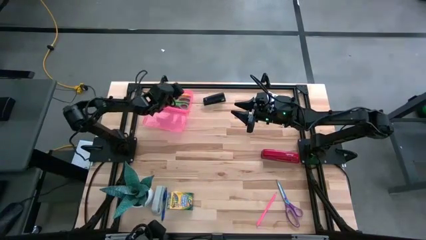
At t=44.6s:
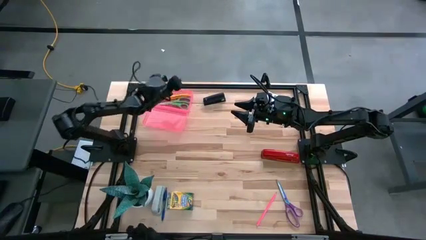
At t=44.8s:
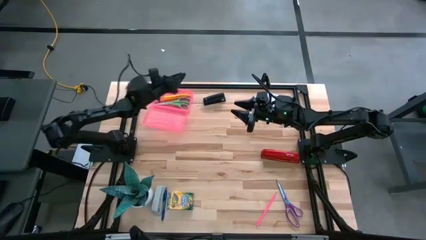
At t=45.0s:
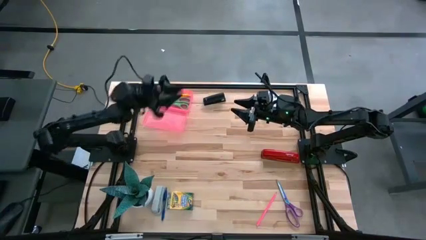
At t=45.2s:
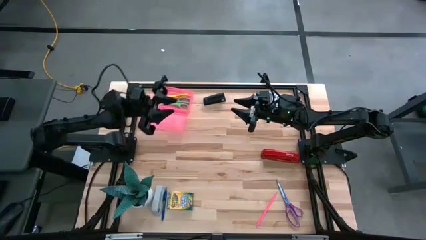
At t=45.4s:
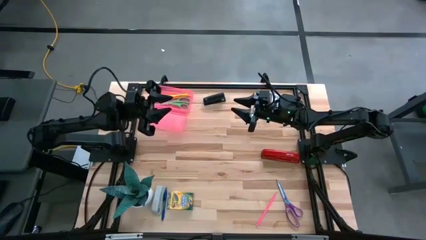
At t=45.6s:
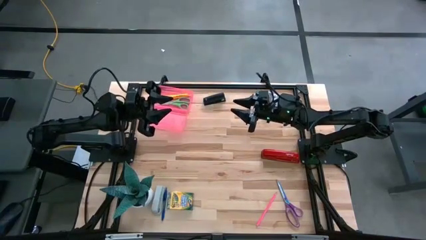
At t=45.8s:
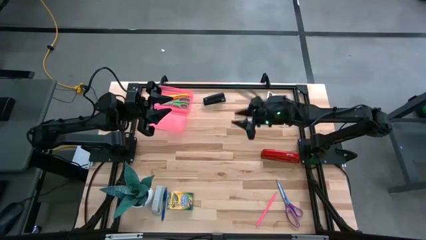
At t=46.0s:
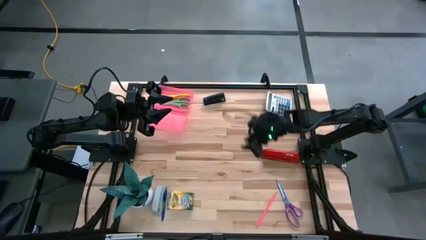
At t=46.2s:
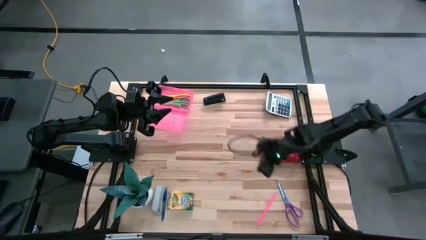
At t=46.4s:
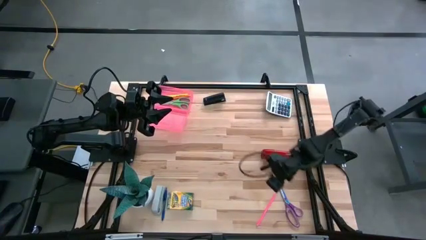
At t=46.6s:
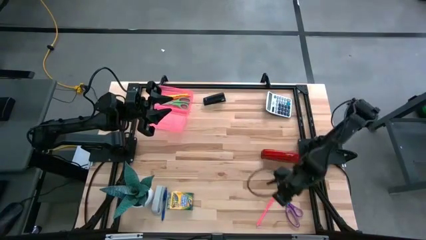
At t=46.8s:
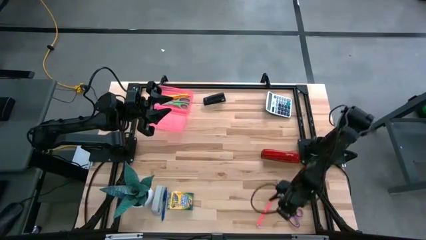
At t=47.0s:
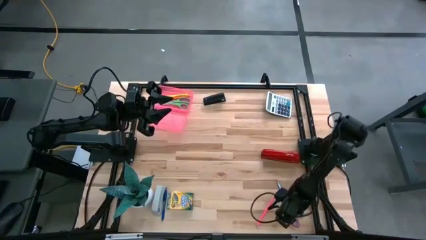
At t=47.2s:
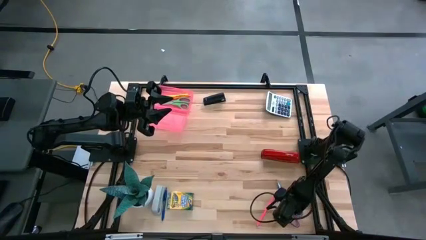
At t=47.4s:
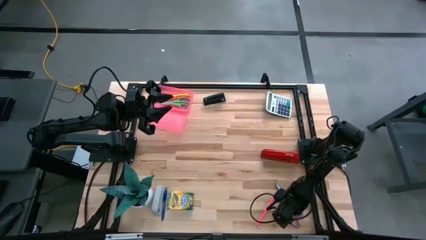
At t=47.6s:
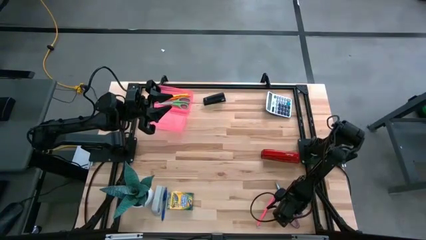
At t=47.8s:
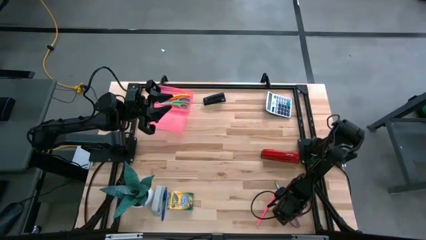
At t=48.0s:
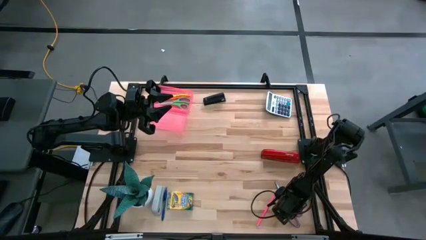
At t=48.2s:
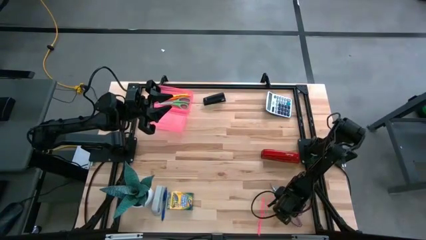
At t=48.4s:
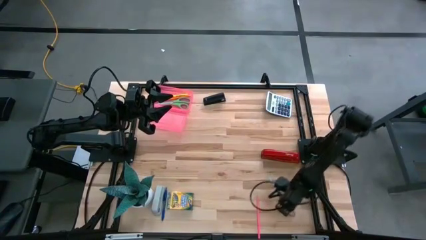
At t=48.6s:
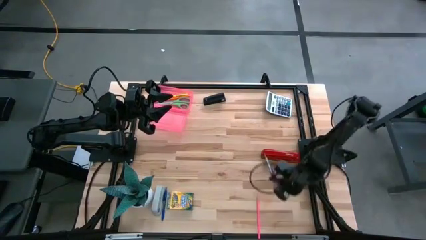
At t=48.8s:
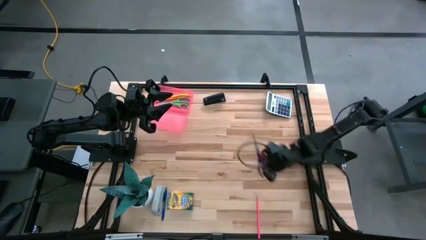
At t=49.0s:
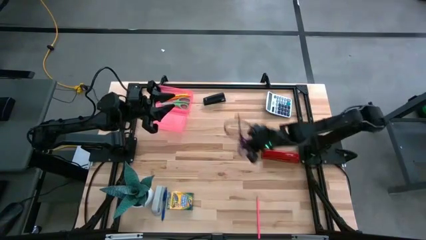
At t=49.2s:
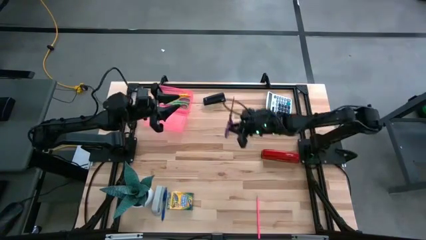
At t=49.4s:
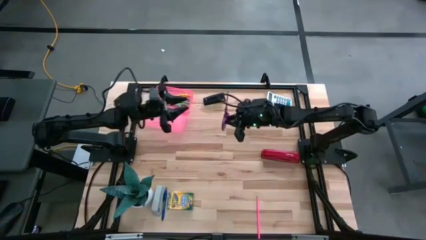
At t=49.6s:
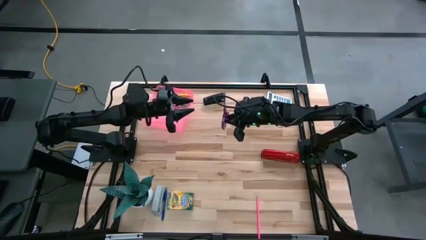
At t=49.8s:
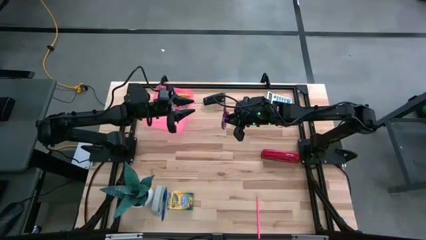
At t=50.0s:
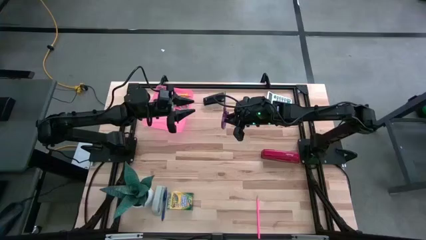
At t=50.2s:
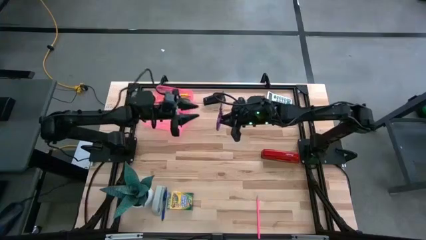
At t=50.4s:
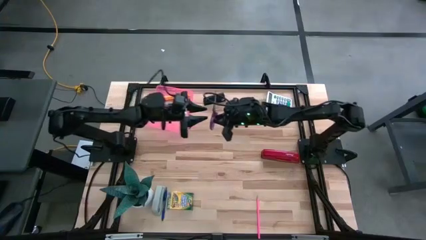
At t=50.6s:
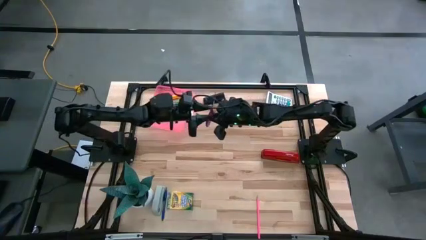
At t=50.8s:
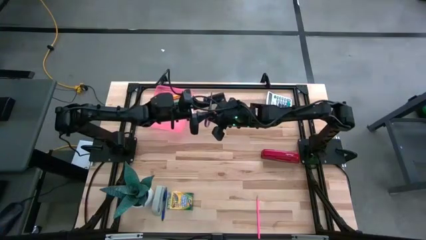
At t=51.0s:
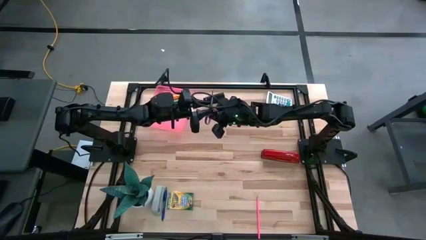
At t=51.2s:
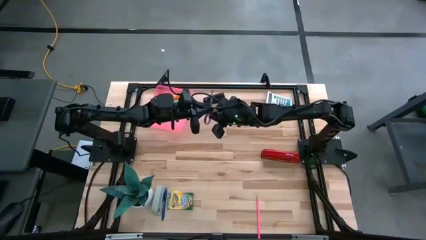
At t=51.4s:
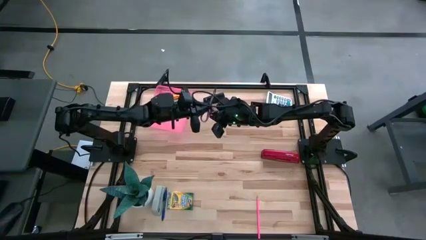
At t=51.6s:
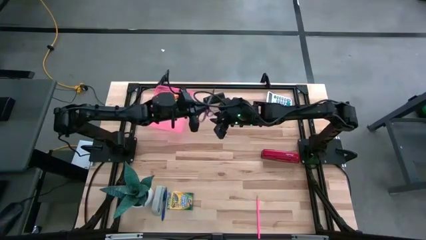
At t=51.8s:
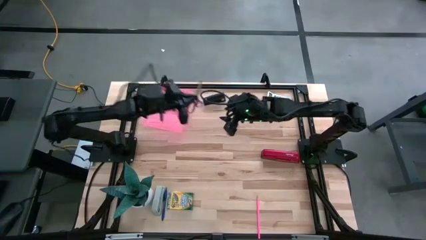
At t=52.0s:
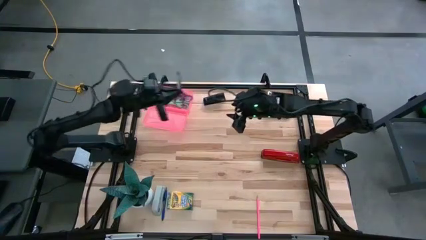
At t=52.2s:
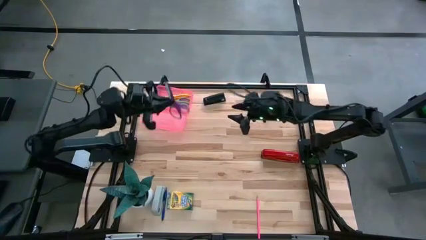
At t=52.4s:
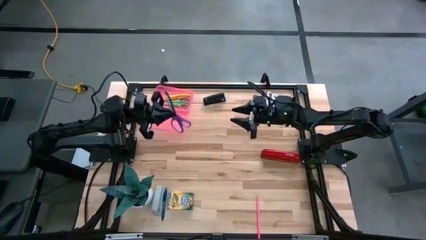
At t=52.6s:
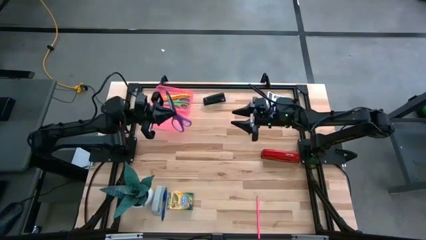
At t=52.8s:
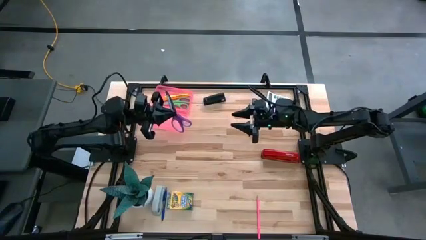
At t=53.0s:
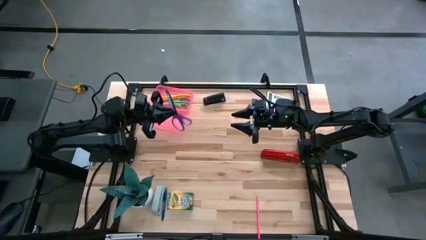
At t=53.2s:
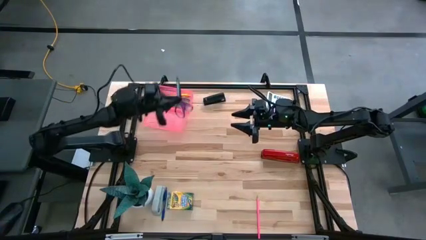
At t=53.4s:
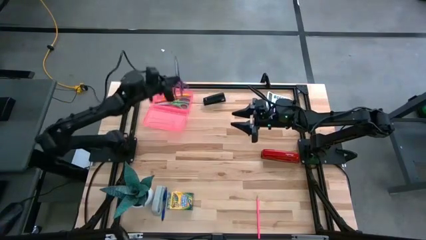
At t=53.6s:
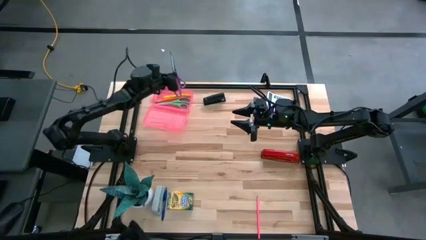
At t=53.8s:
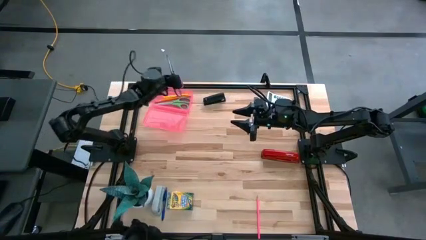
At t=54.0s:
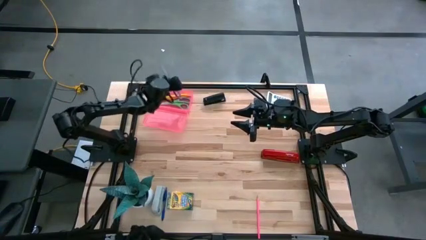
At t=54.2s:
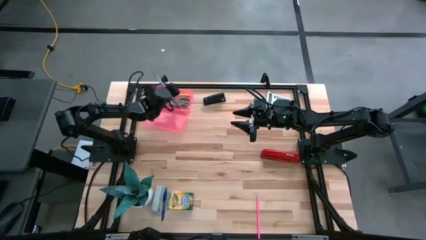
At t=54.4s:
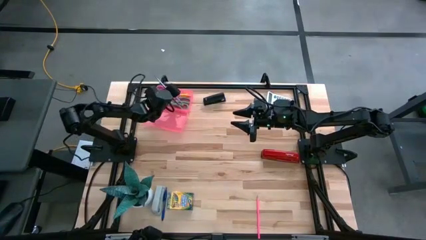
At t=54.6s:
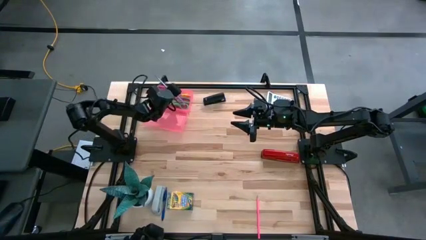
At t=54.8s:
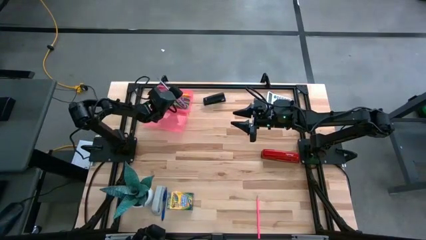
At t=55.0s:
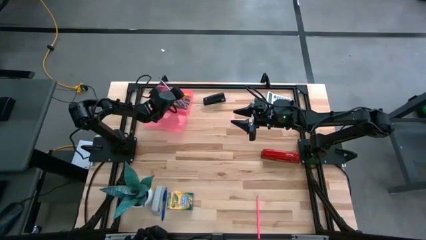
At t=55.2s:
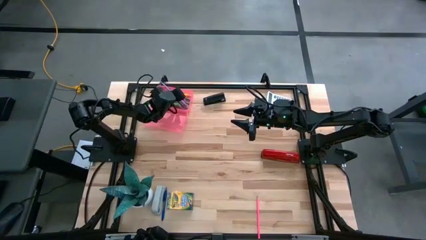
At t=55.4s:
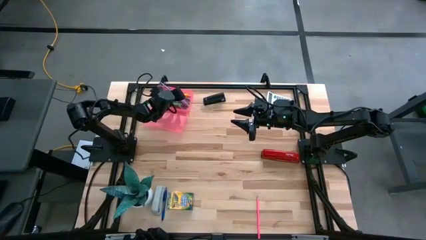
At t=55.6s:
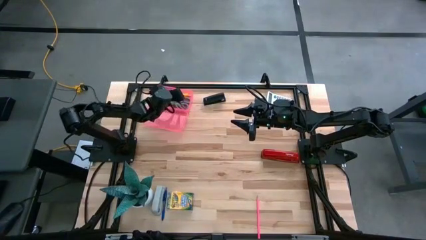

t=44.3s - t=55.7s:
Task: Pack school essentials
Put the purple scissors into the pink supply box
